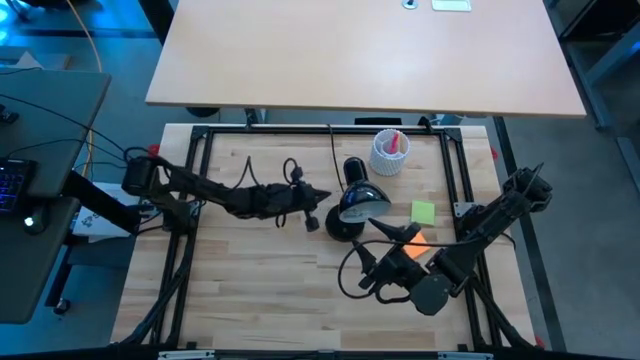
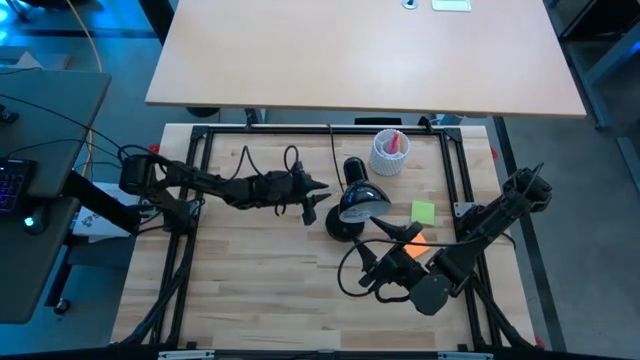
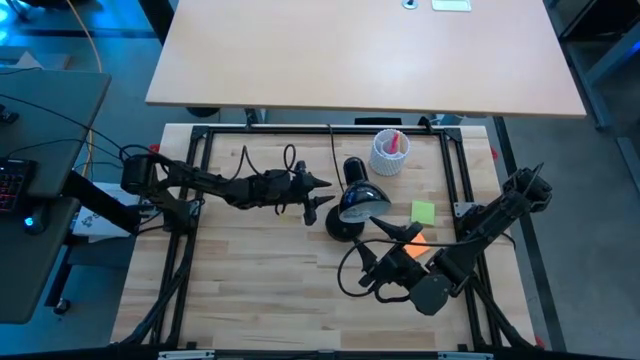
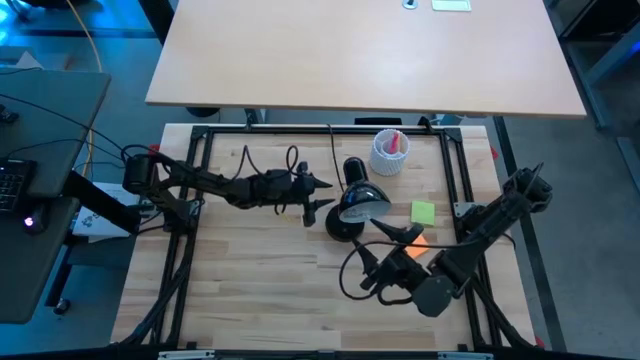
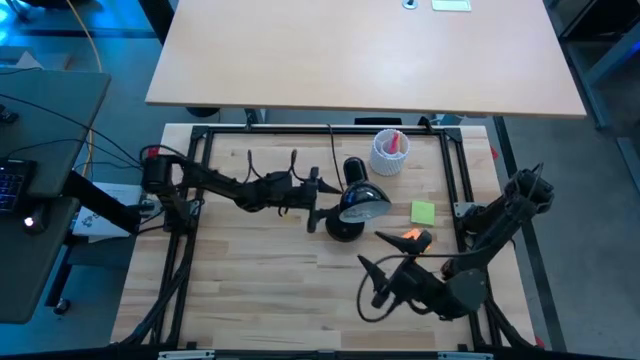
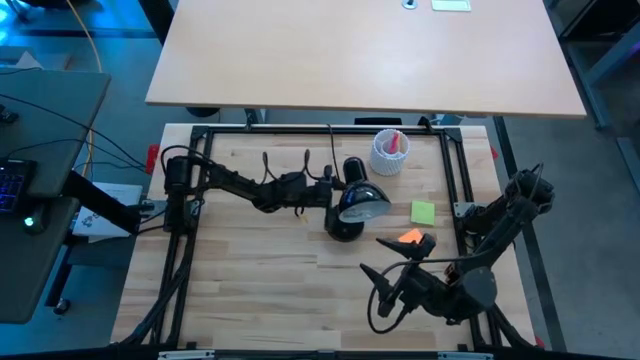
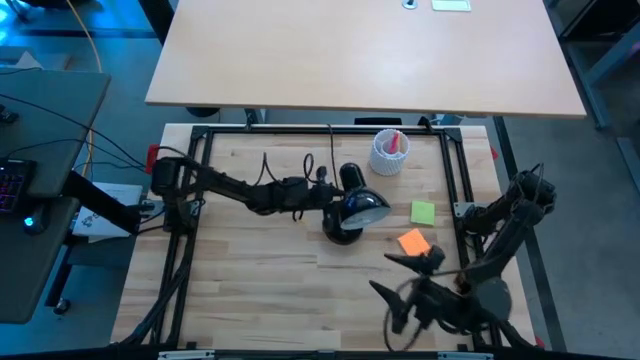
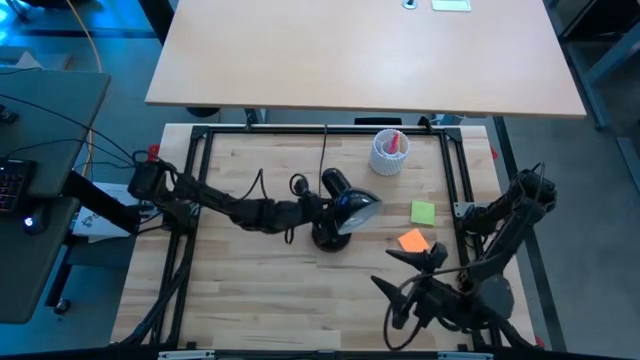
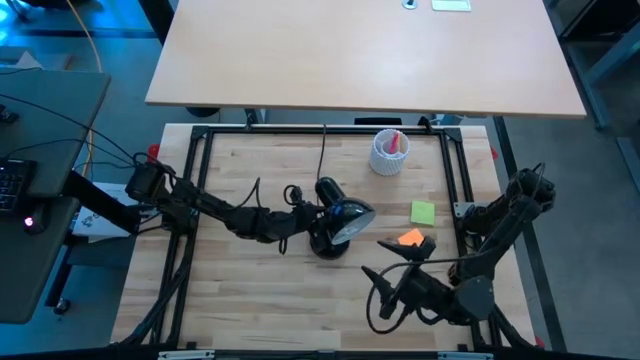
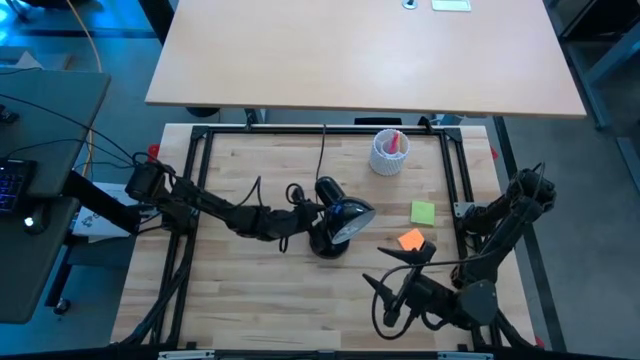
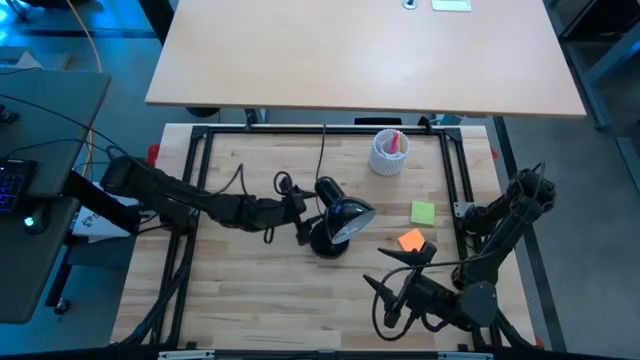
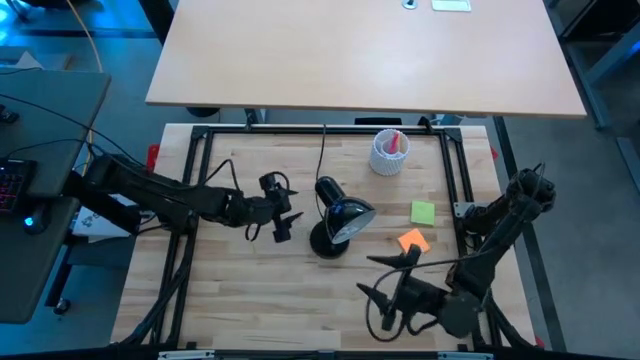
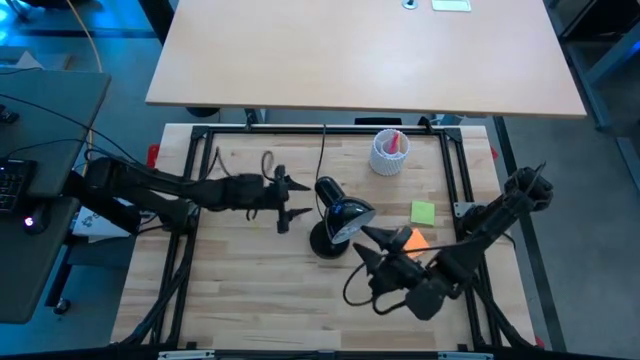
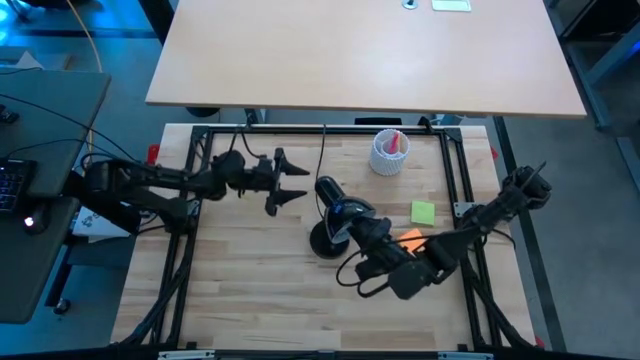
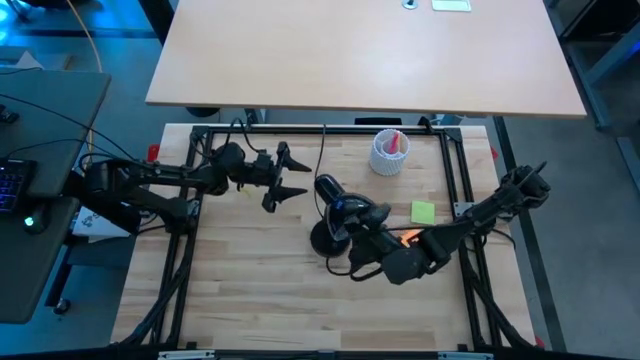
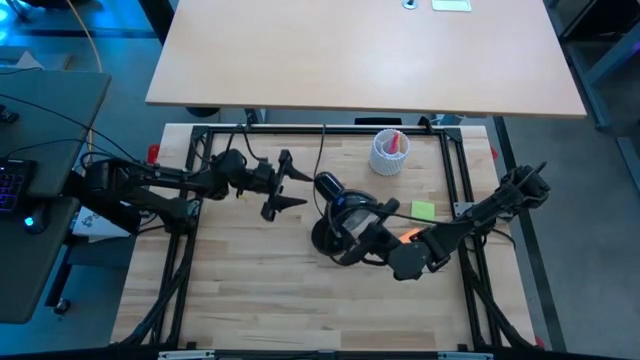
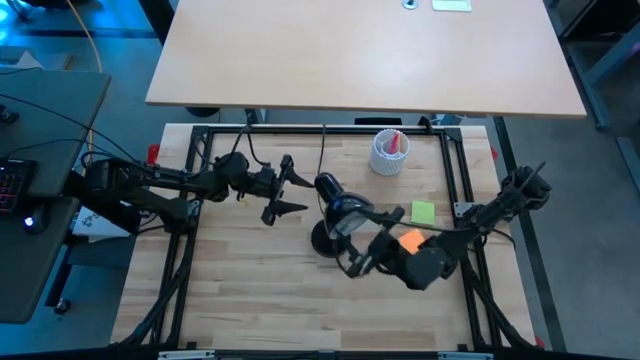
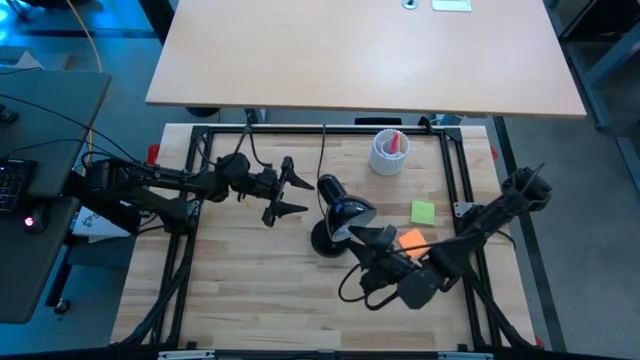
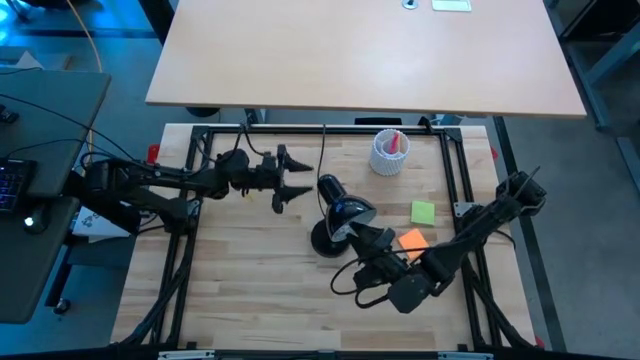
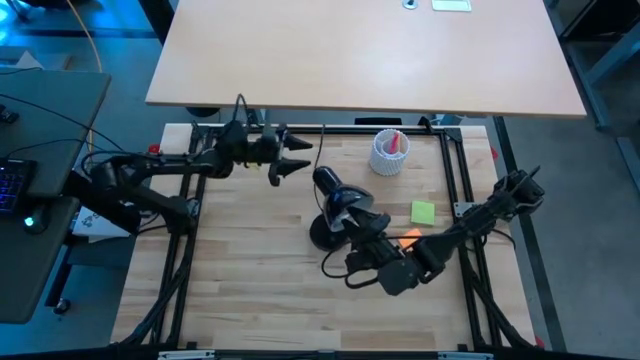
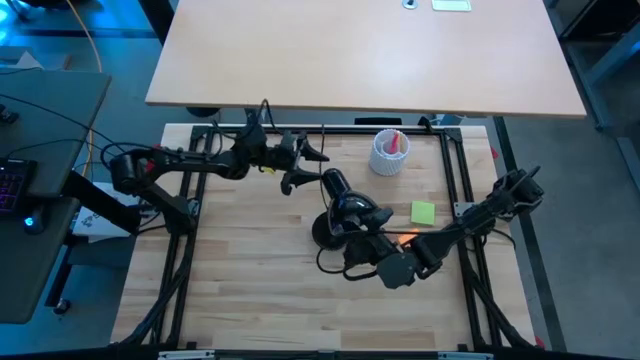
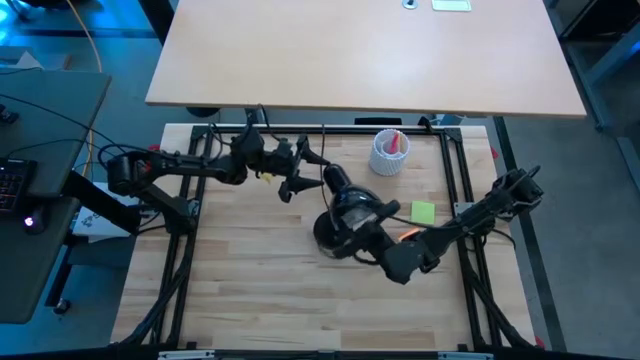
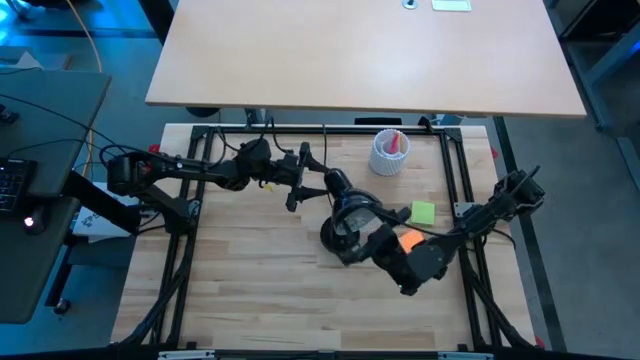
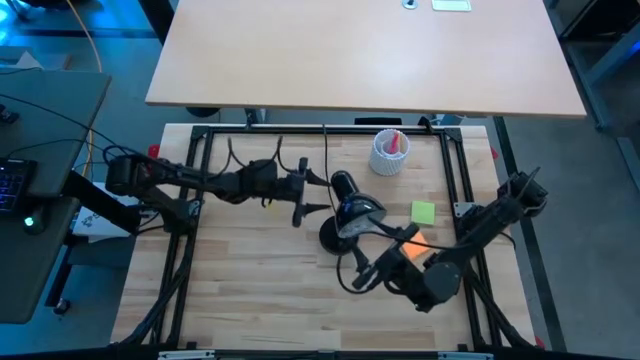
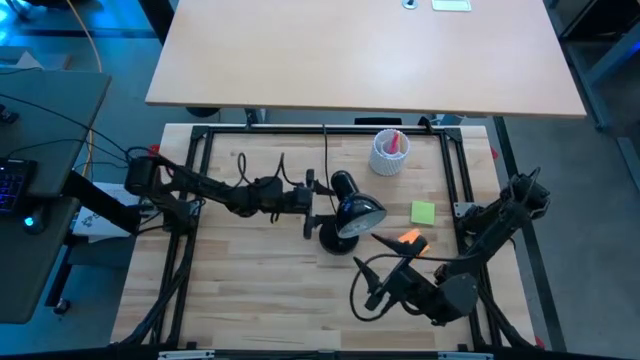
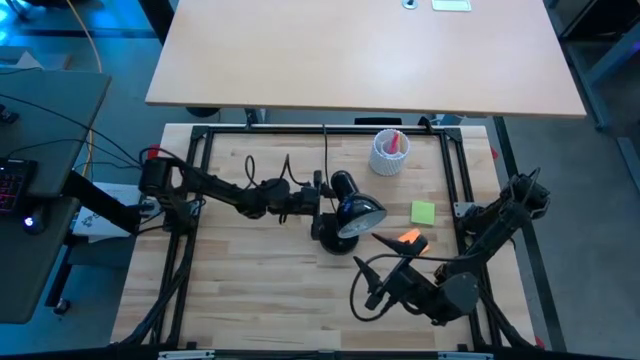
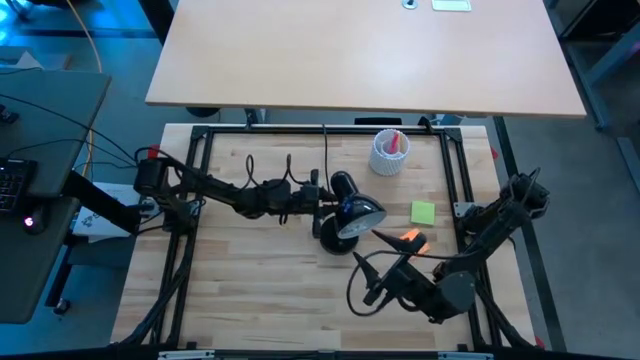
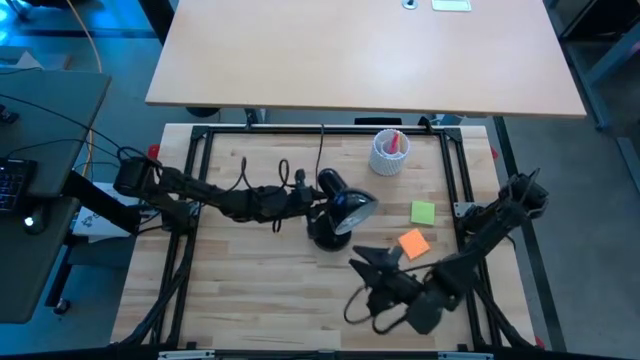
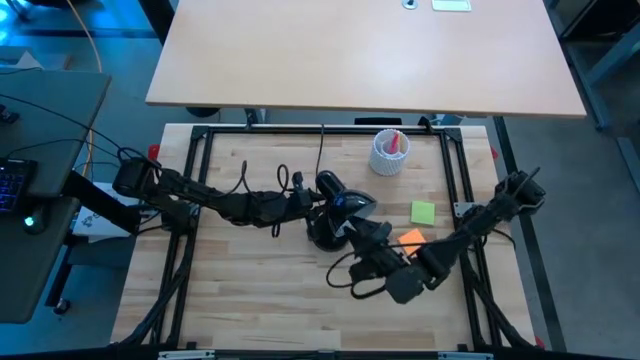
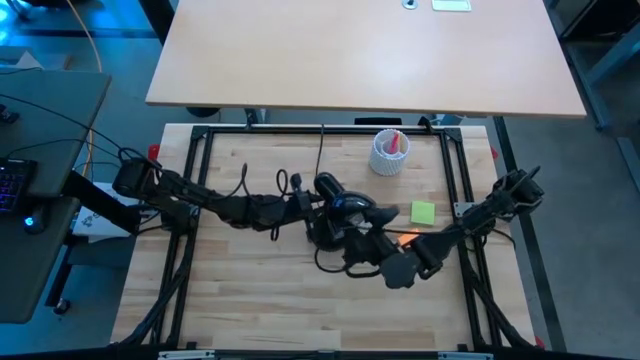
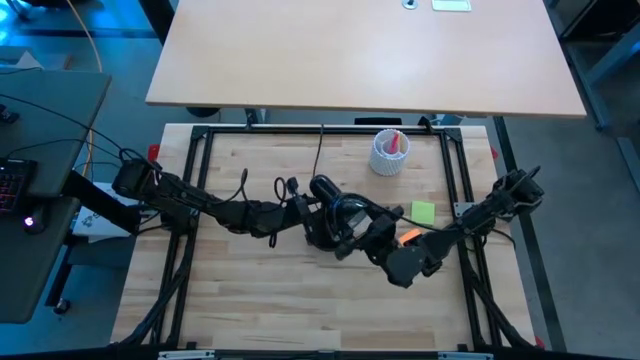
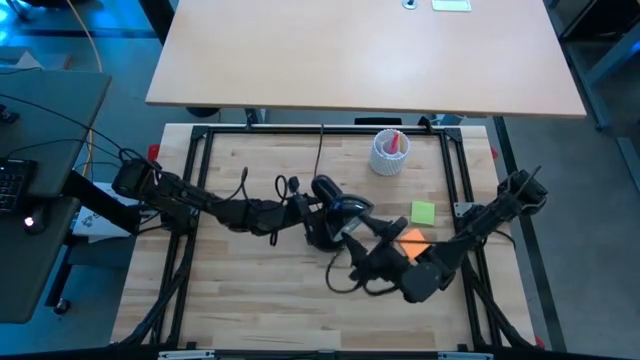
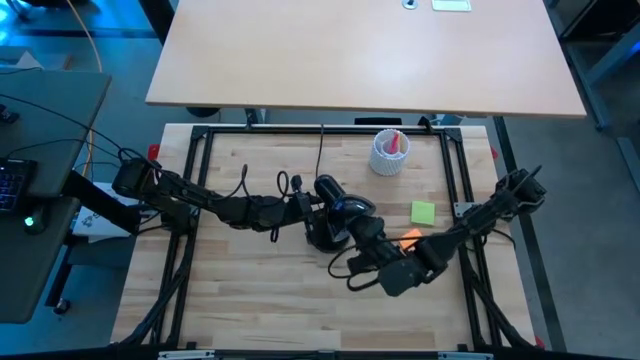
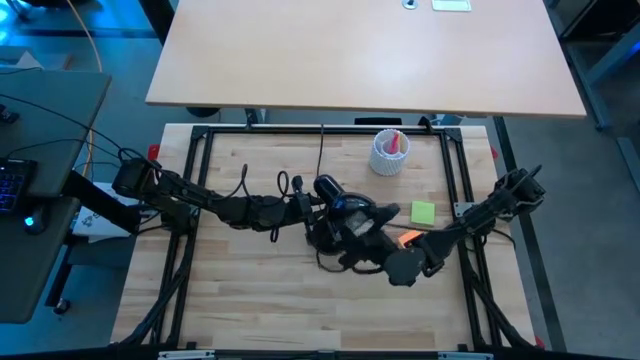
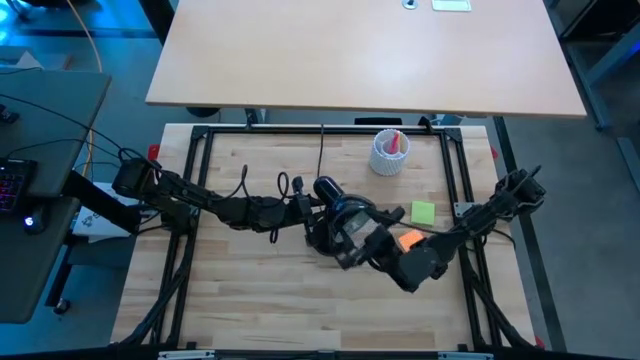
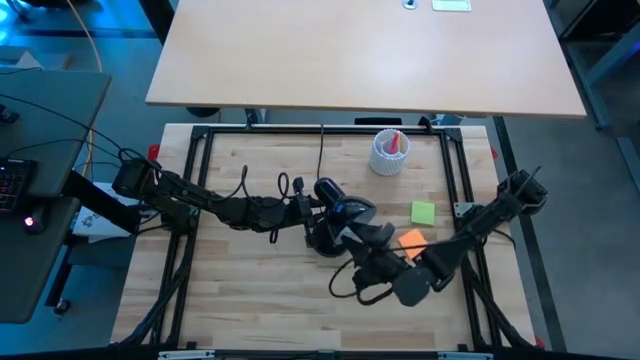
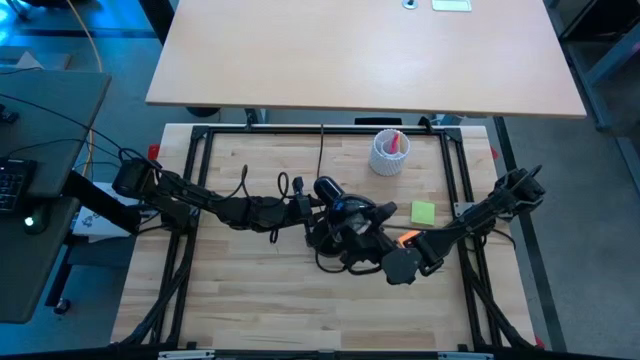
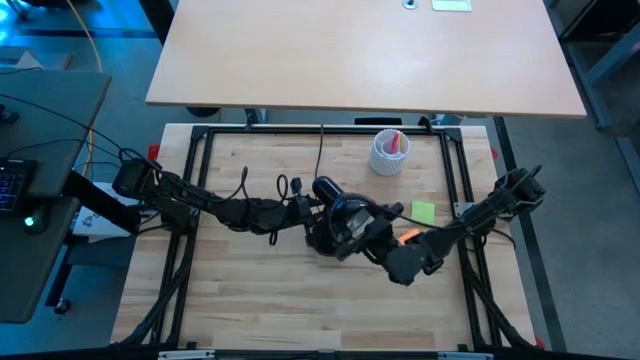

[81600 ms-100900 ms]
Task: Screw lightbulb
Insert the lightbulb into the desk lamp

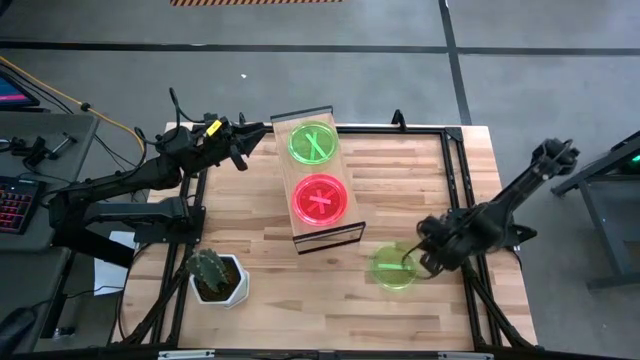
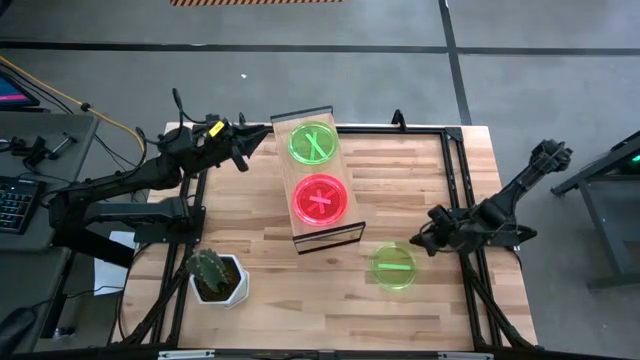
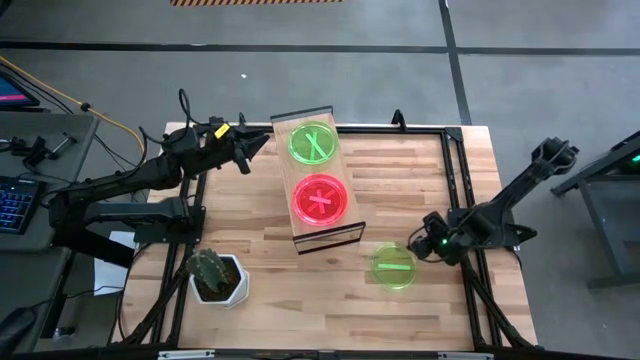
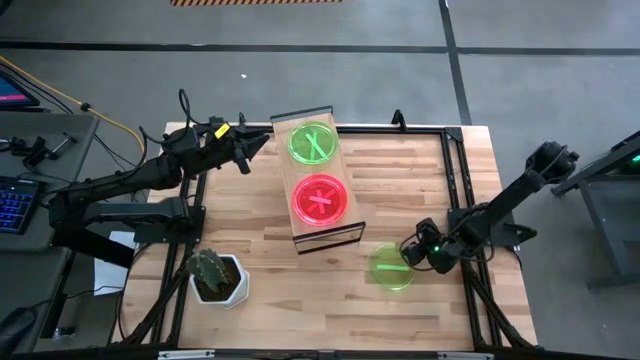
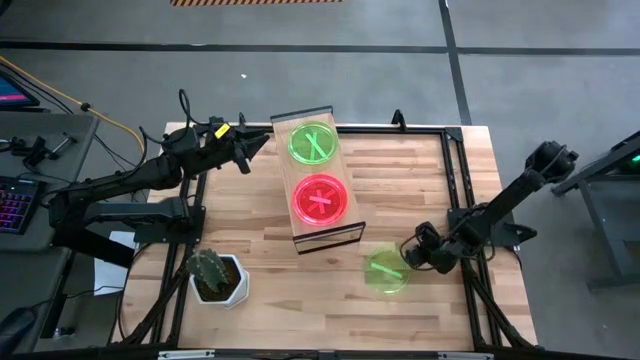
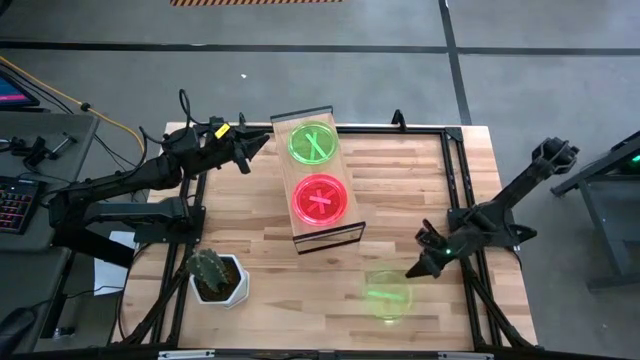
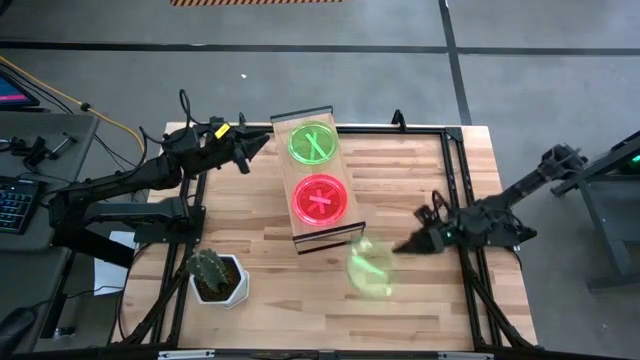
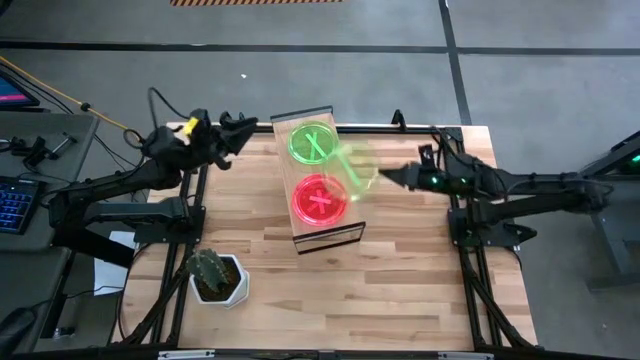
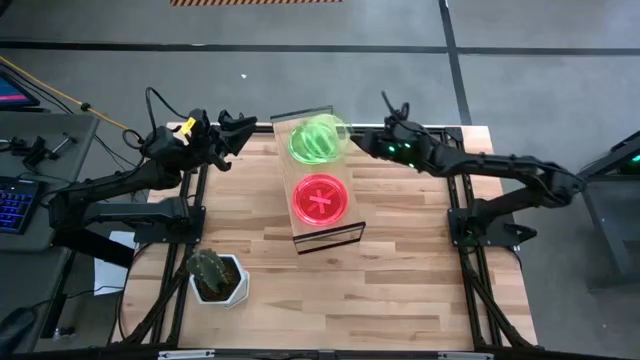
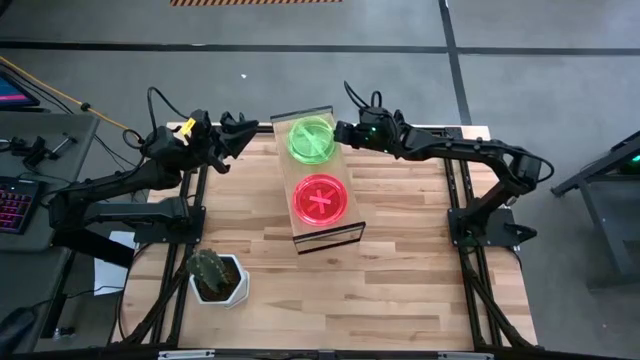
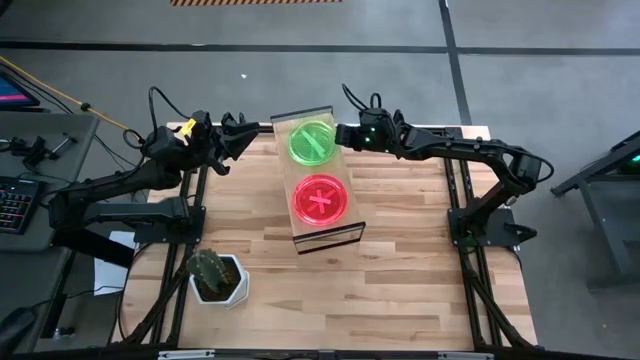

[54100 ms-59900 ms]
Task: Place and stack plates onto a shelf
Stack the green plate on top of the green plate on the shelf
